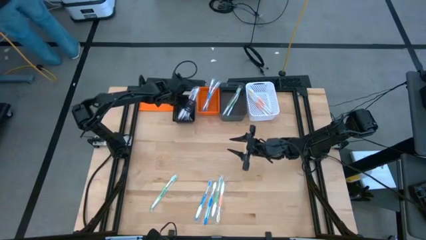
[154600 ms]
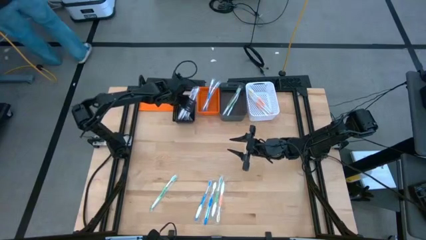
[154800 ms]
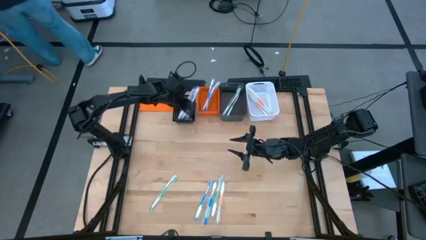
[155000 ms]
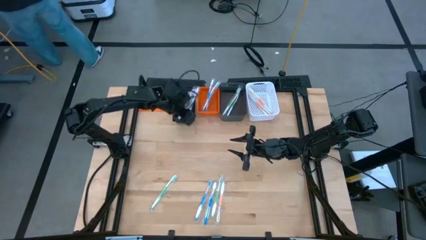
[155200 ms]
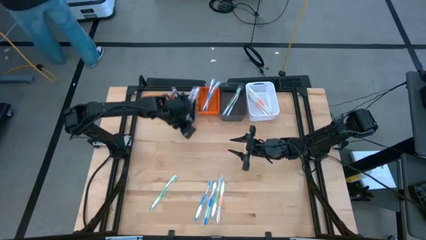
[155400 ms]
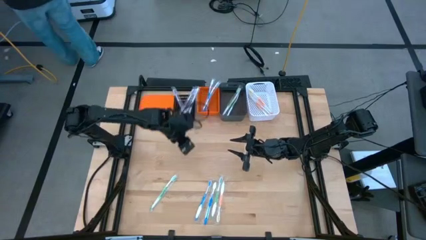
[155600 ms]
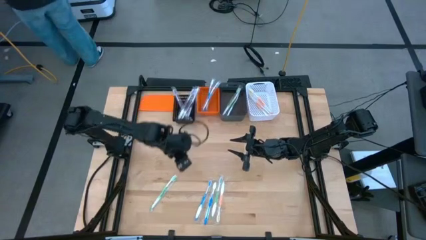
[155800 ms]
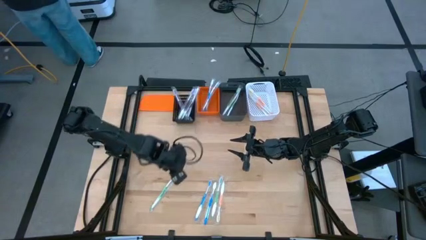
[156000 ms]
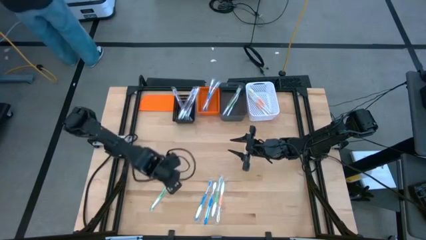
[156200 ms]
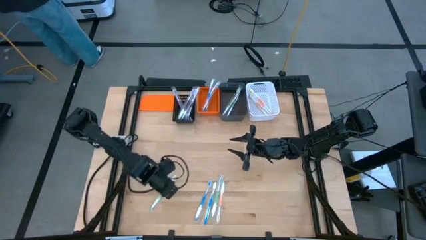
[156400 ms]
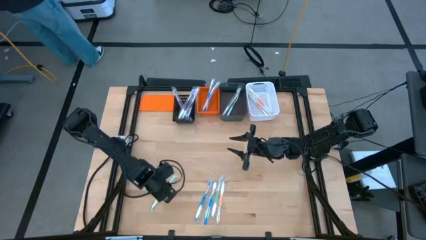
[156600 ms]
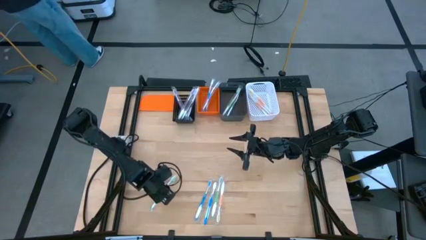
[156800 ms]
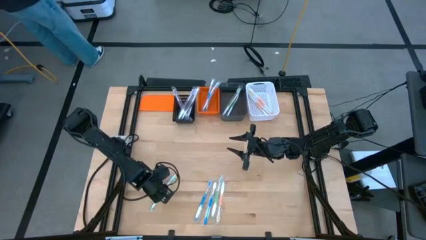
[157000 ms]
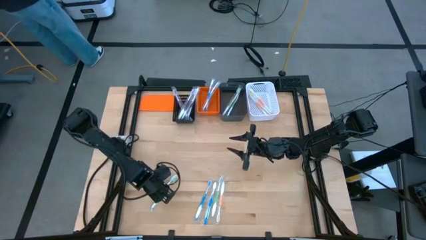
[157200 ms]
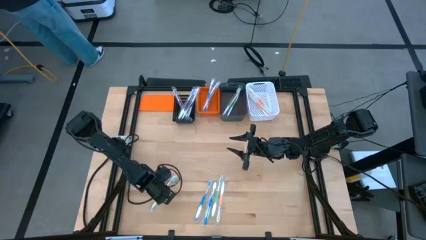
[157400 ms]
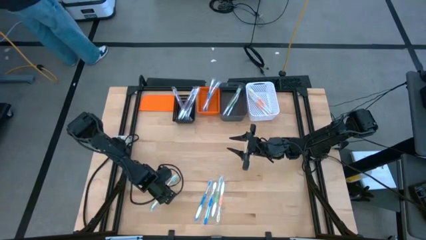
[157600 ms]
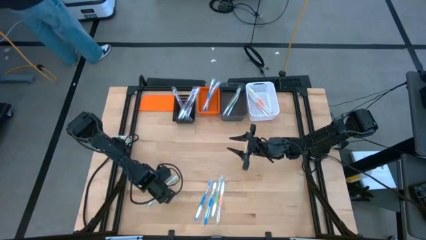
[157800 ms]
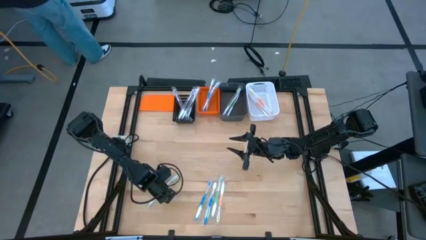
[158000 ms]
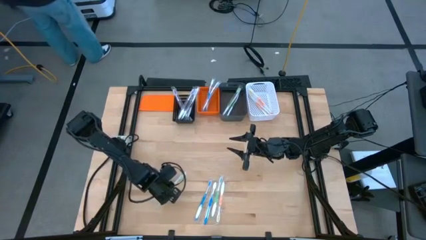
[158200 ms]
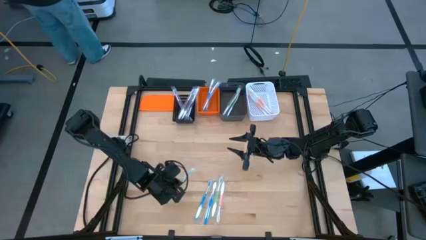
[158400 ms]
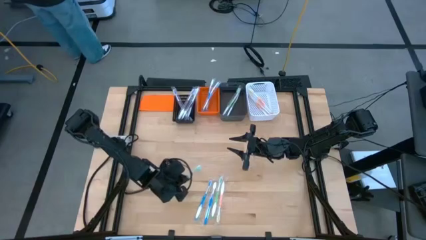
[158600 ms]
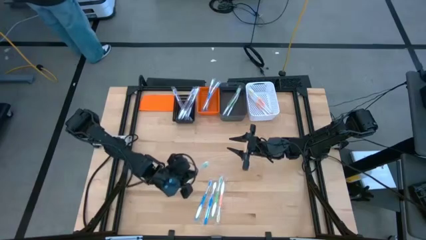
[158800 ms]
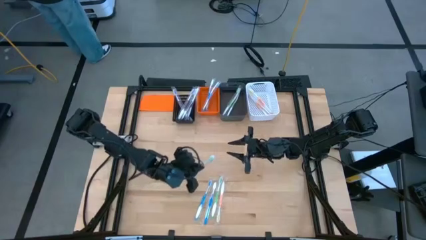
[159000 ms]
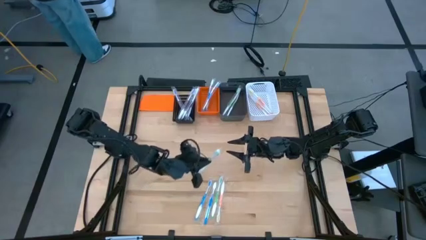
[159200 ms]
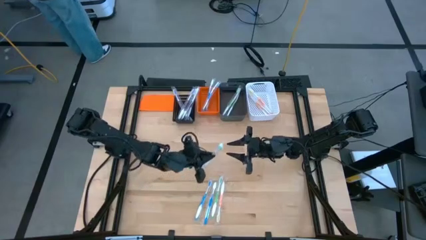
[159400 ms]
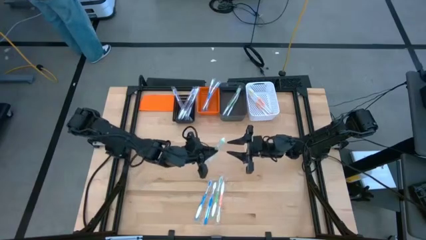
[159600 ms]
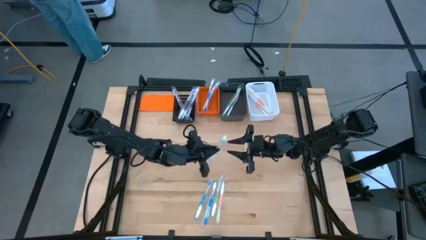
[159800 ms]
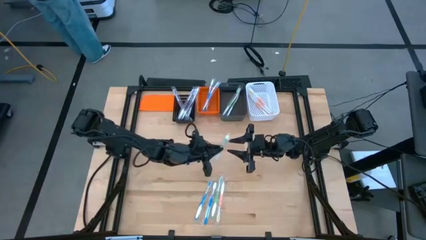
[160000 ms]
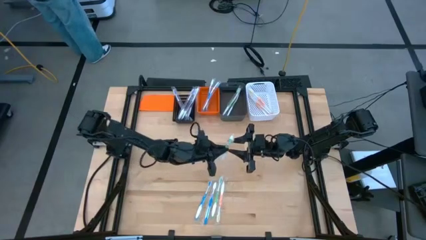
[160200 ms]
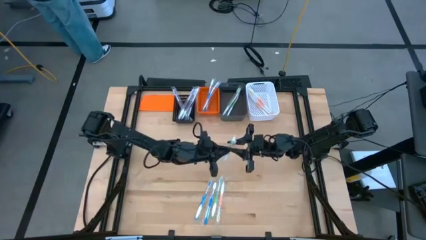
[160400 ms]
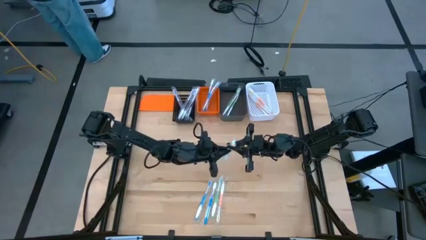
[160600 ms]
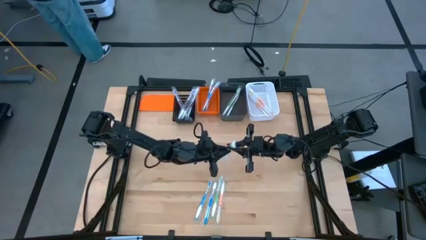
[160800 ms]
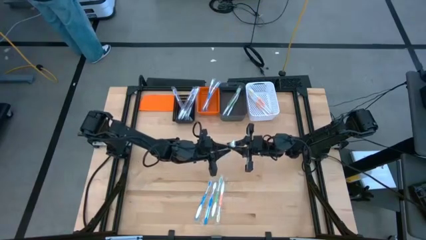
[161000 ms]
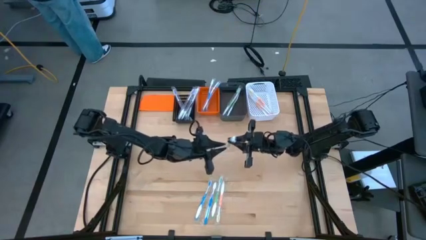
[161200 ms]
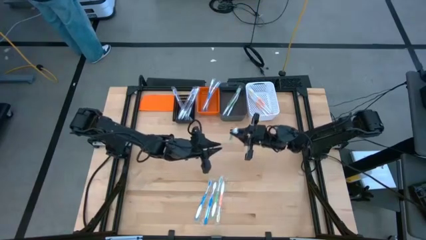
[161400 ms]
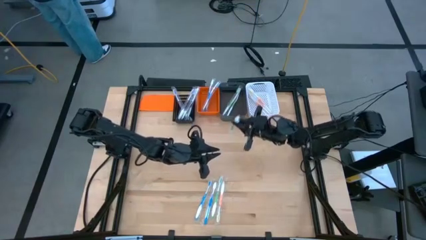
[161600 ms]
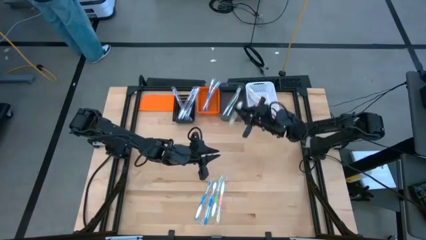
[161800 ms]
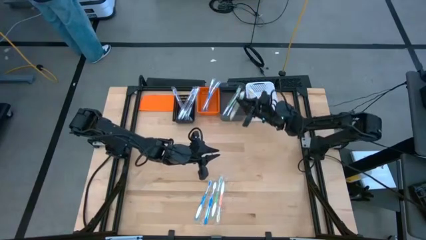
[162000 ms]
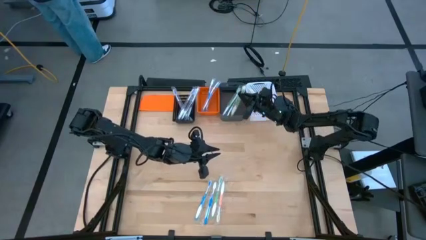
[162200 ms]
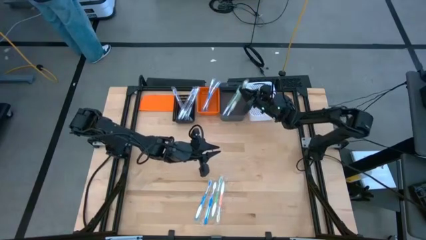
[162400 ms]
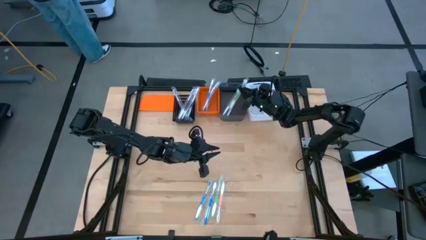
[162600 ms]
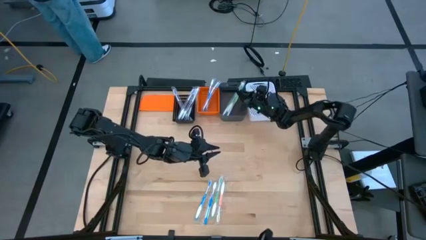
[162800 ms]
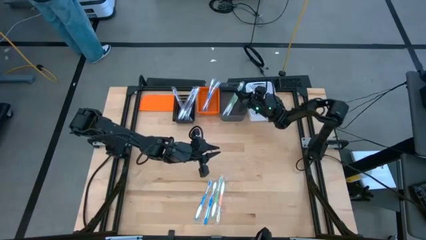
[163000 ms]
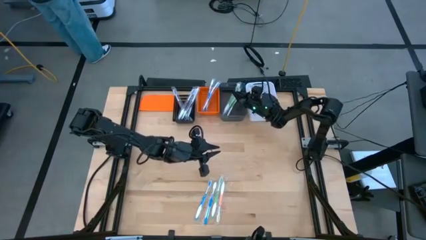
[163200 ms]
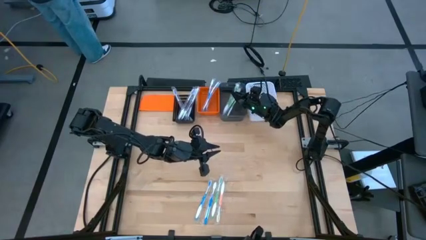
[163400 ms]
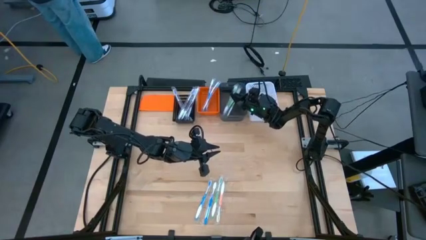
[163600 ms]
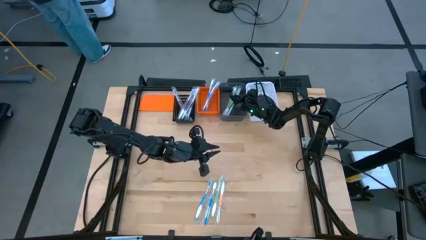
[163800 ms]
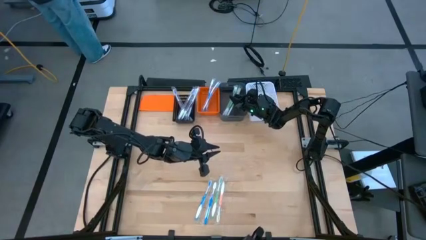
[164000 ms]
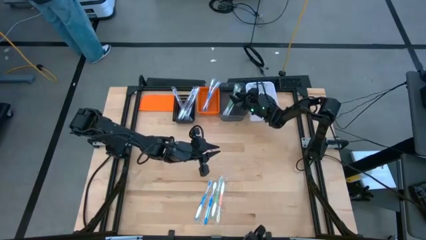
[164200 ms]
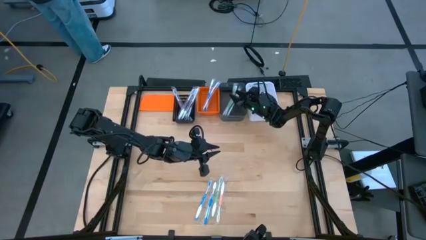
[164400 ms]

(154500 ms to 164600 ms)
Task: Pick & Place Toothbrushes
Put the green toothbrush into the black bin

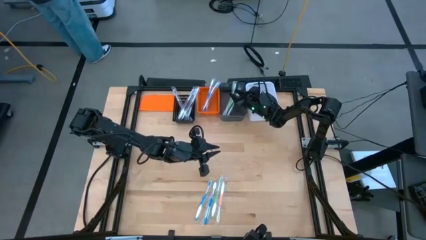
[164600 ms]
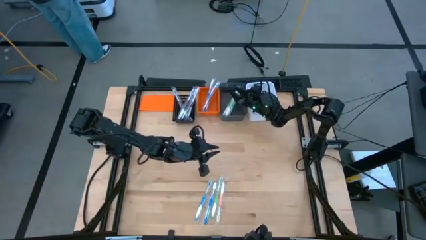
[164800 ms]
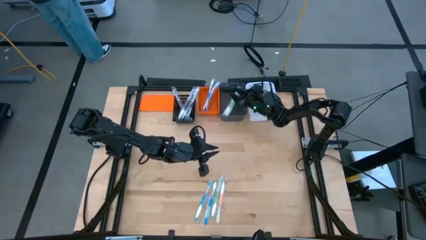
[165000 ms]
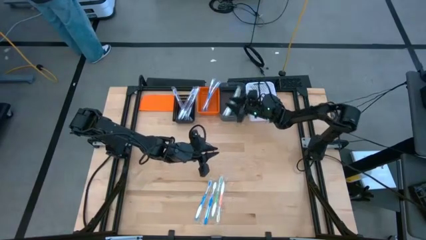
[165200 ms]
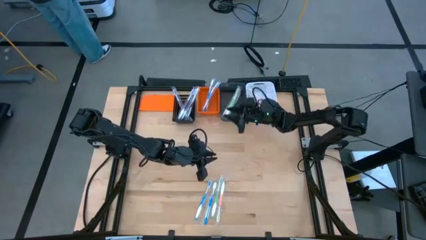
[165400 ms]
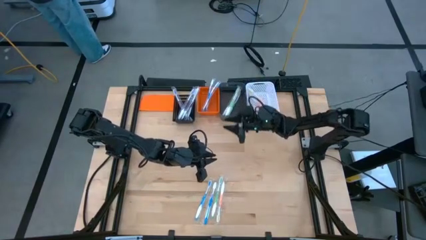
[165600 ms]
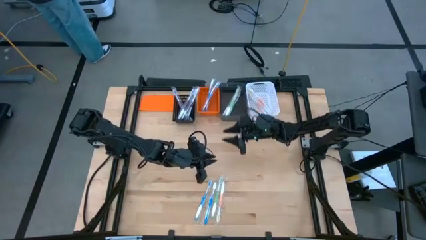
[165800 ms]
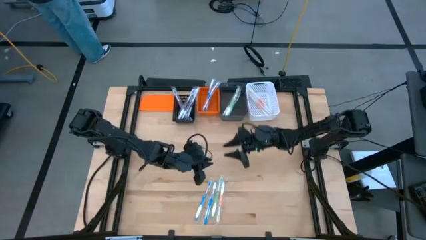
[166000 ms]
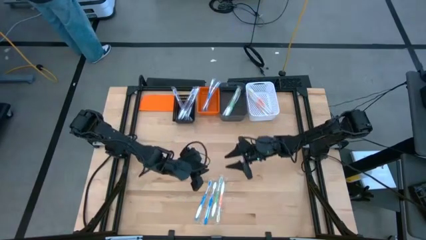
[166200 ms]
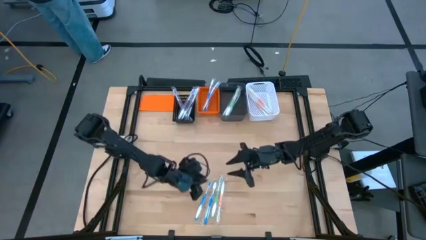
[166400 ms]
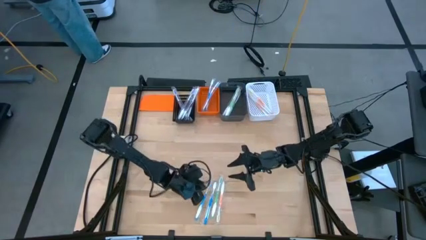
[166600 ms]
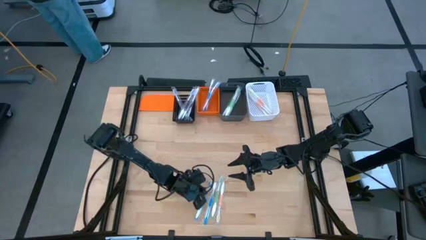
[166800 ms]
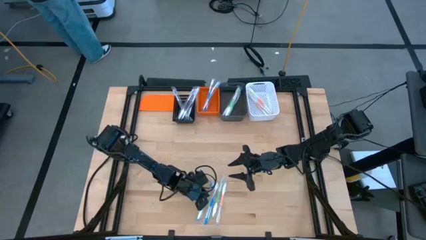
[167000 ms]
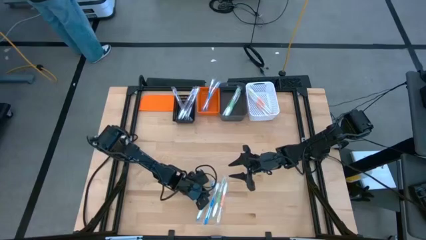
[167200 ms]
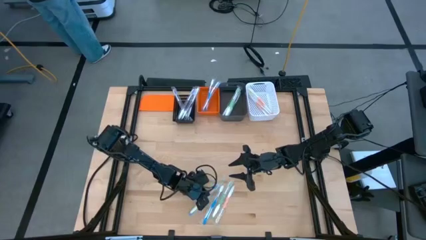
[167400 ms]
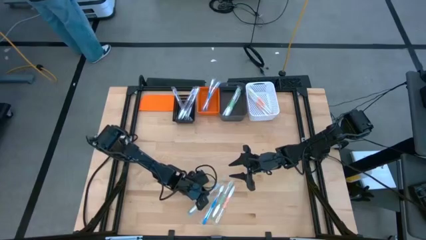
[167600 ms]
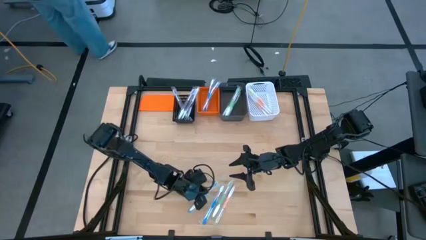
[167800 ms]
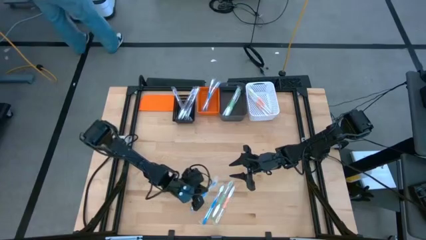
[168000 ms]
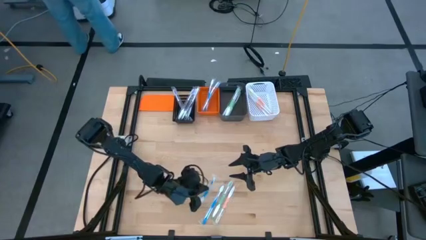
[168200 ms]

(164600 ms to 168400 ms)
Put the blue toothbrush into the orange basket

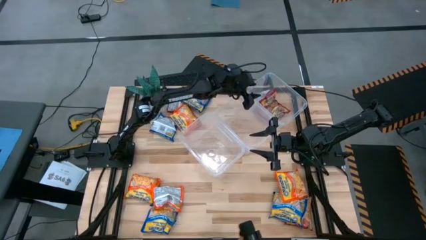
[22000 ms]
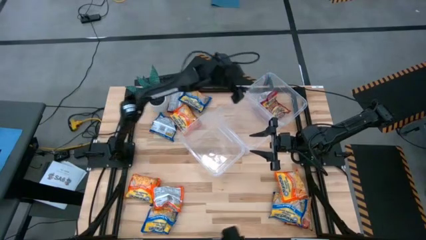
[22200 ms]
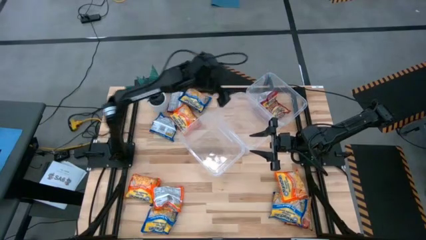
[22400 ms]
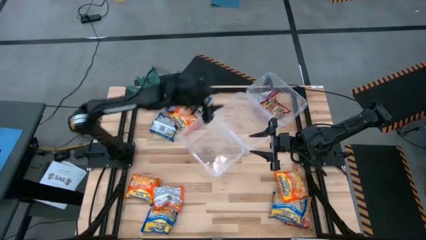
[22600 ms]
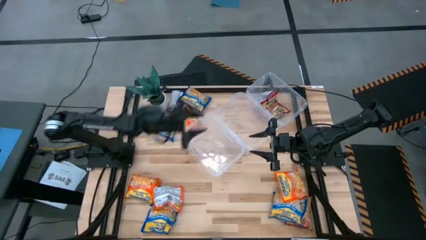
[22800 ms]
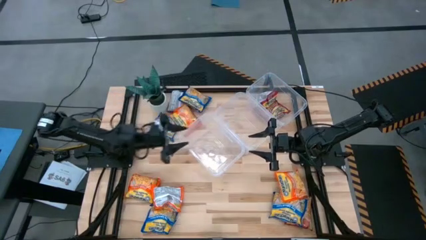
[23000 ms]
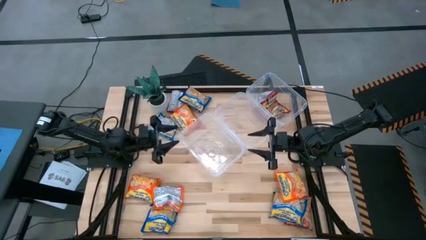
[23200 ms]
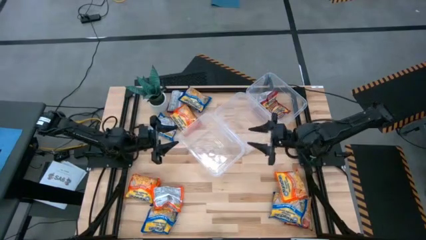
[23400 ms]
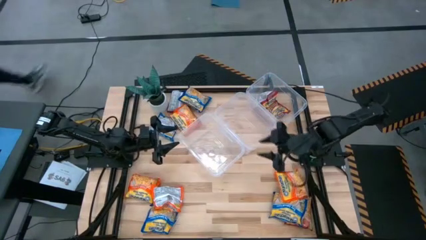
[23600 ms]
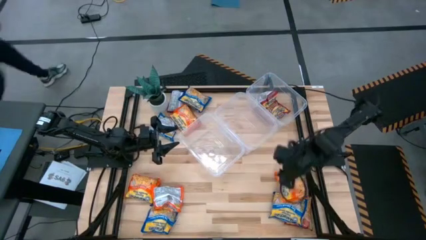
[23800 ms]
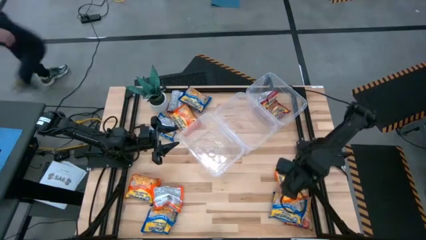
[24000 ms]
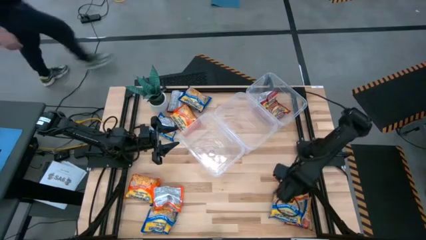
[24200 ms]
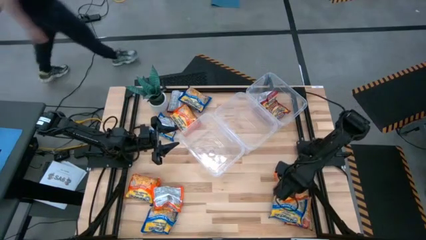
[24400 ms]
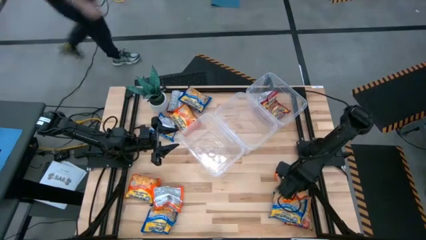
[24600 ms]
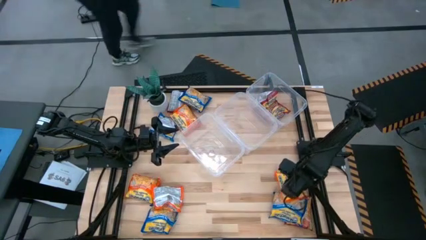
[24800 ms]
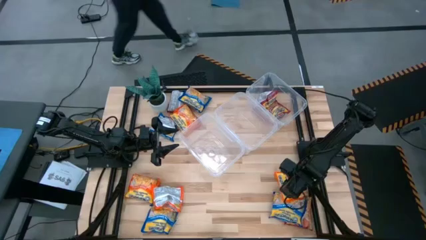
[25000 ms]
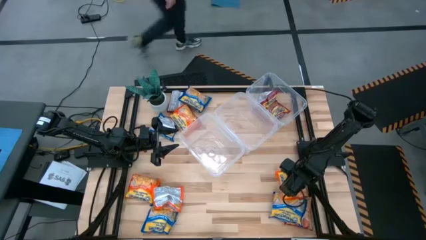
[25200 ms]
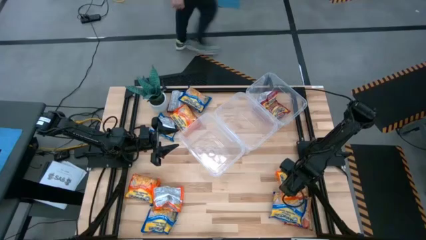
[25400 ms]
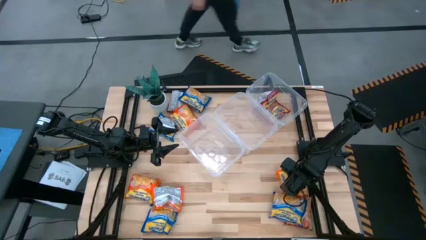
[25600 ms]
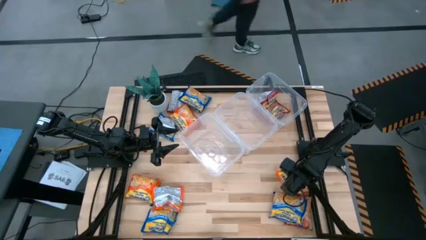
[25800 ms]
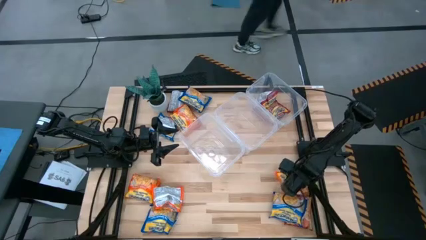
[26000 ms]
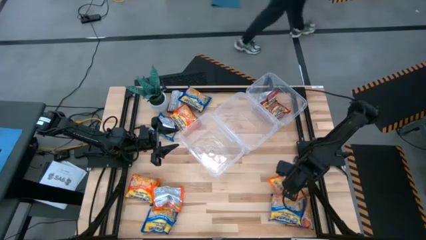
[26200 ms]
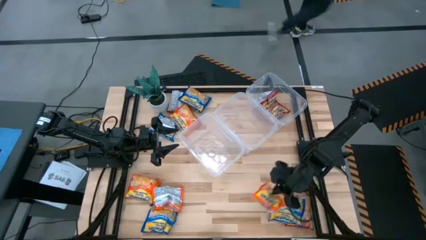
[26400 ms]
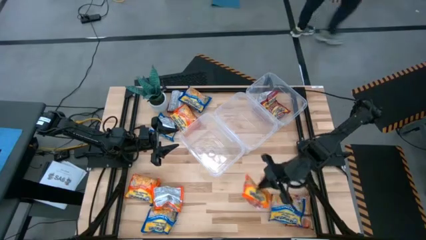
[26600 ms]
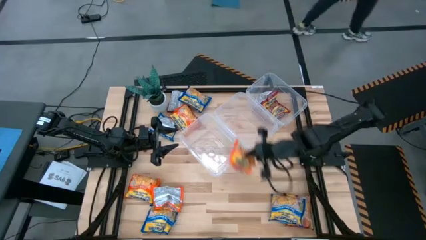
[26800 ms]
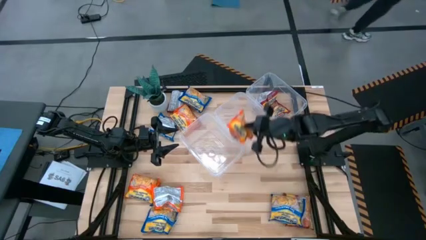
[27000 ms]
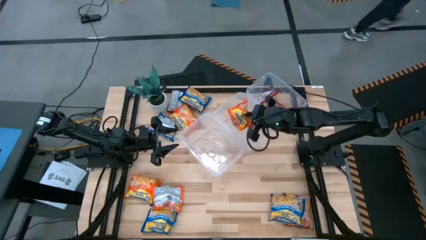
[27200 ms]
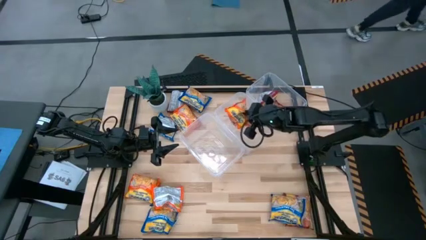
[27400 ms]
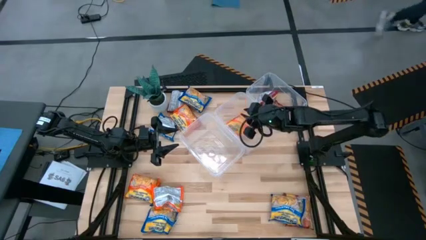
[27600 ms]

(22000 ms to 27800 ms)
Task: Sort Maruchan noodles
Put the orange noodle pack into the middle transparent bin
